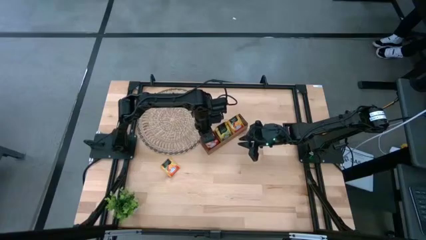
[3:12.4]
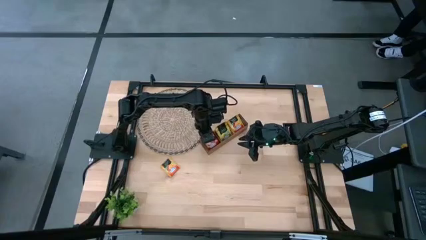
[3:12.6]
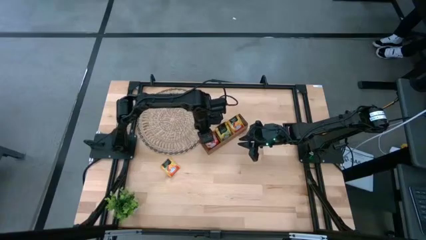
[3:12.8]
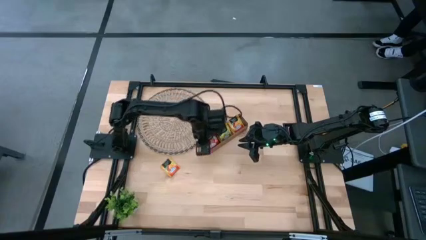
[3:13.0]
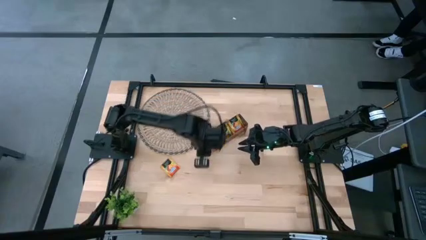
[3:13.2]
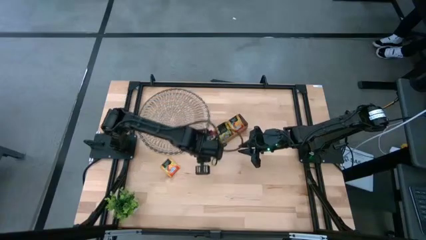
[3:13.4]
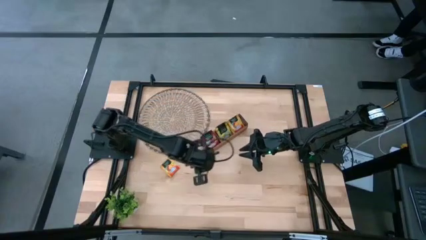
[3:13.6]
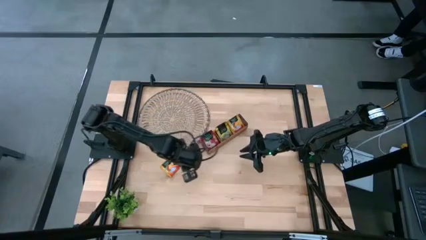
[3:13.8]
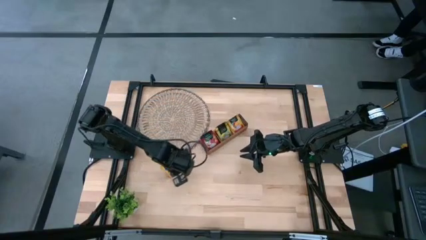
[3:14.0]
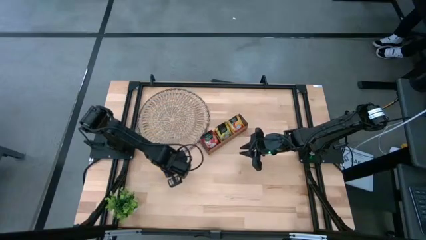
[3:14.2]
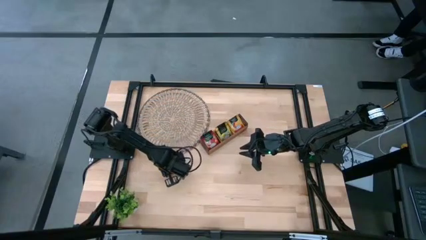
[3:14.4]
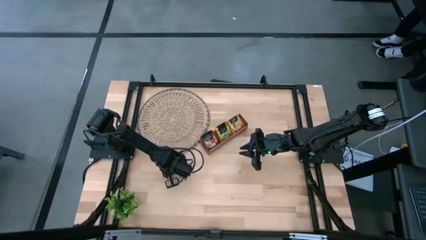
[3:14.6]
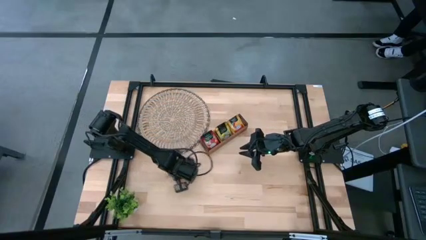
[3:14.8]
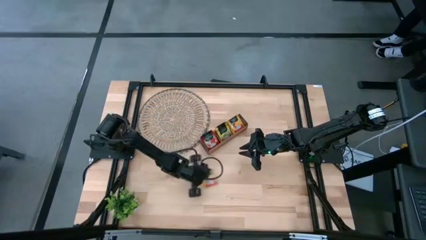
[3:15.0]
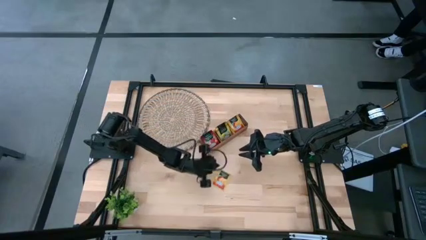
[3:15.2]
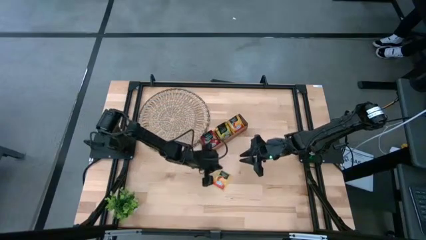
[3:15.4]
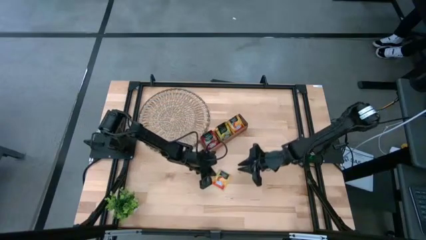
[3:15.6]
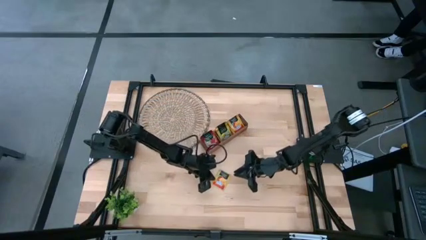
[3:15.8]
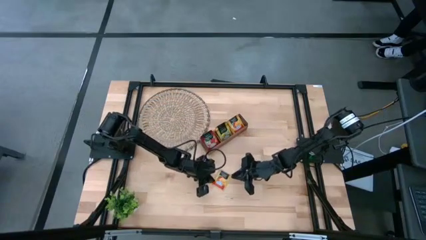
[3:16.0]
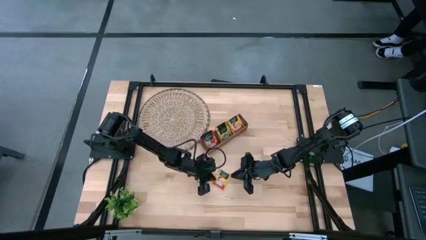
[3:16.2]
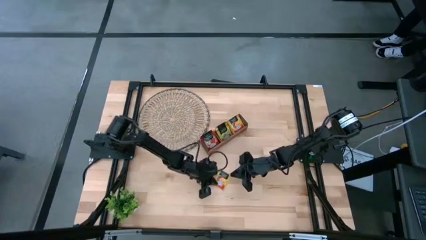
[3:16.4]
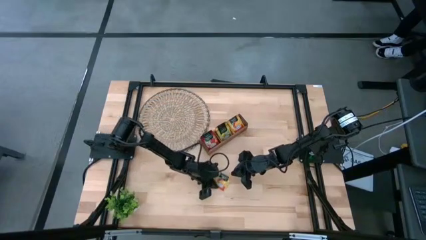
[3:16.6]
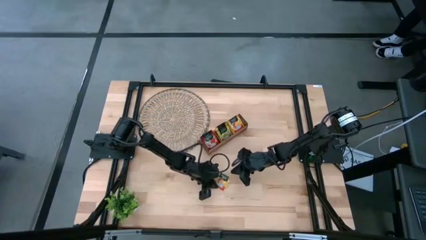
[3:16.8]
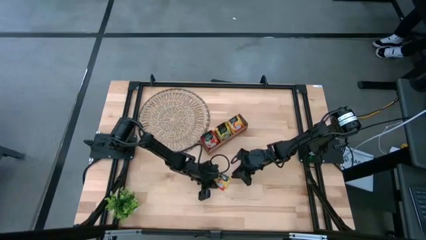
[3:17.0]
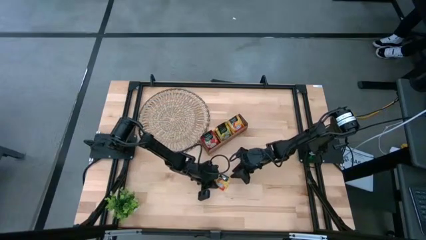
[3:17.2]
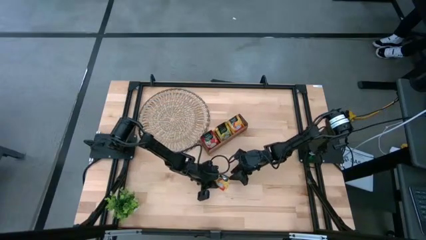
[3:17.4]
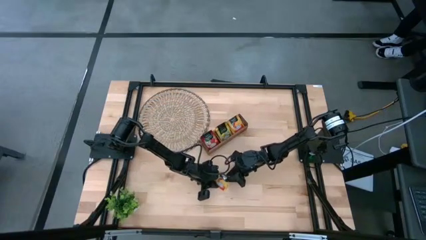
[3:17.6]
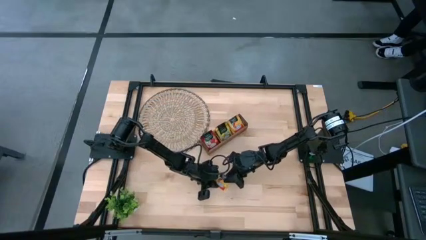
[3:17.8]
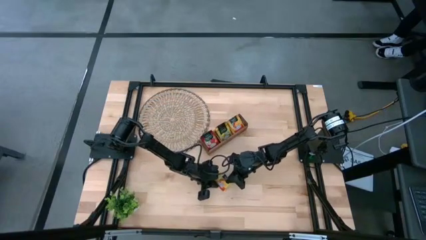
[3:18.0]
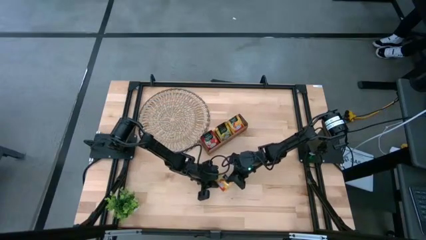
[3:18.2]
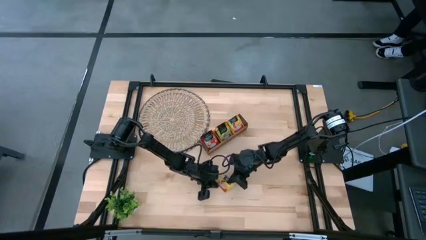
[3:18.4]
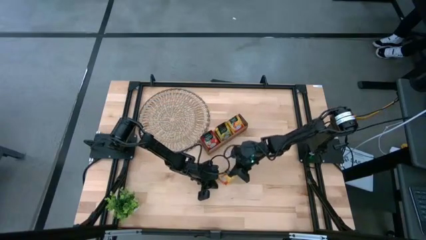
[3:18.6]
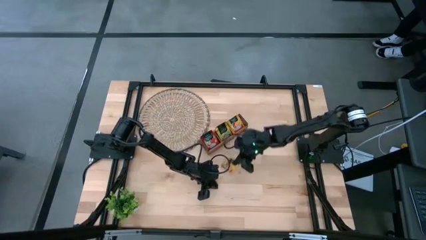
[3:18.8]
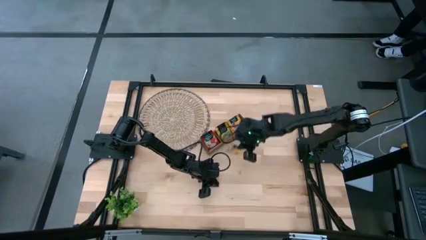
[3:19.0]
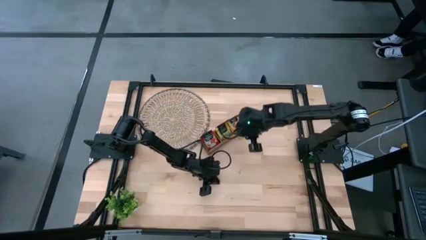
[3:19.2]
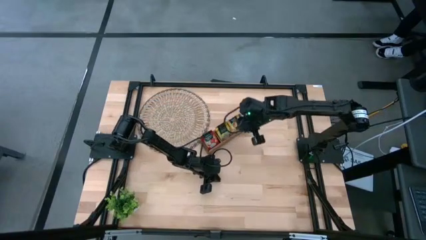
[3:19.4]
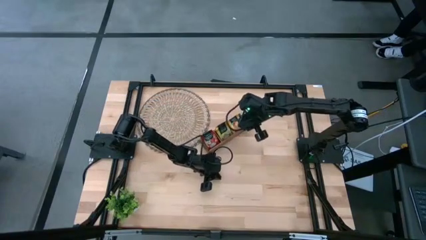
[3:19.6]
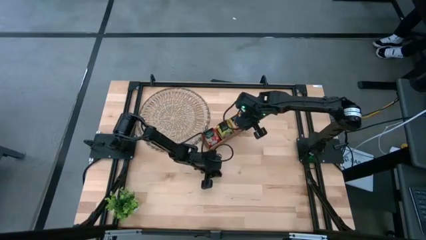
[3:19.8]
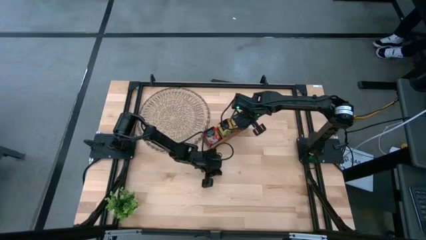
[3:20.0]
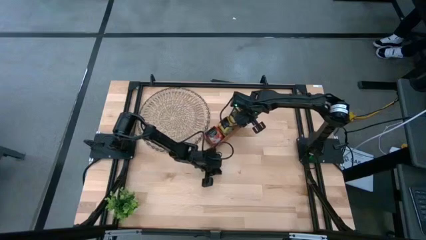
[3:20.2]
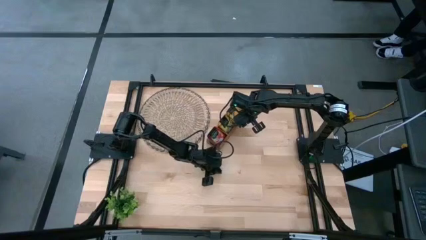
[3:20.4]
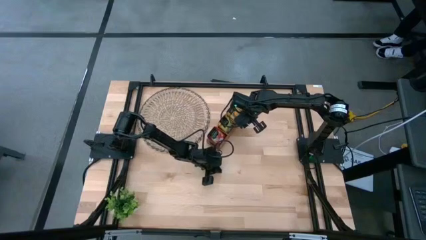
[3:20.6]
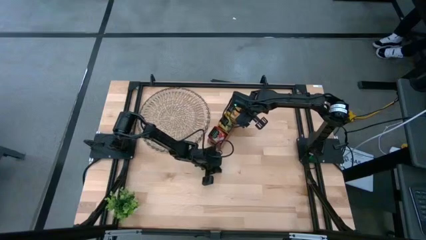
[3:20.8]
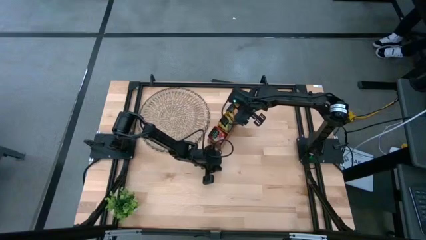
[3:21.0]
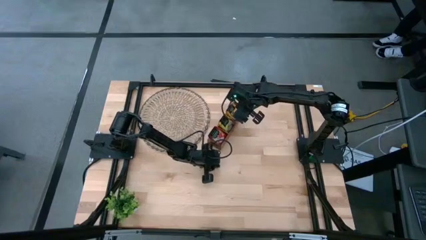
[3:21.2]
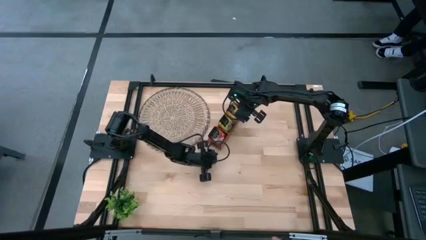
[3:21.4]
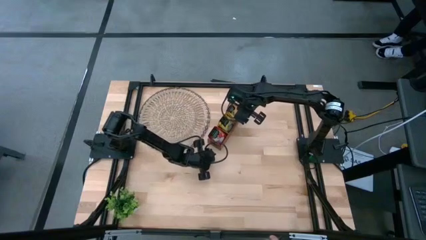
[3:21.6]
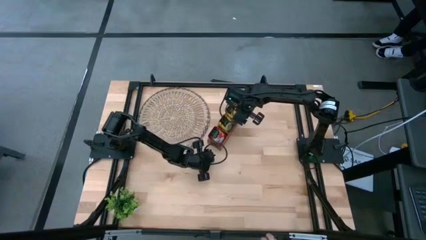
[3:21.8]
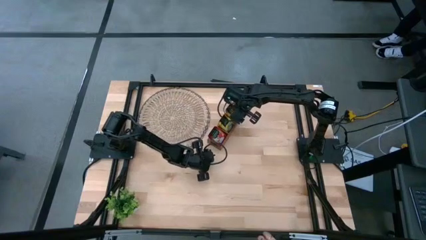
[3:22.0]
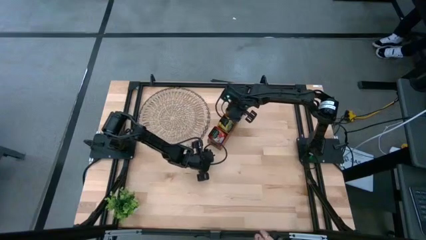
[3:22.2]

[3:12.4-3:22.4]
Task: Pick & Place Tea
Put the orange tea bag into the right section of the wooden organizer

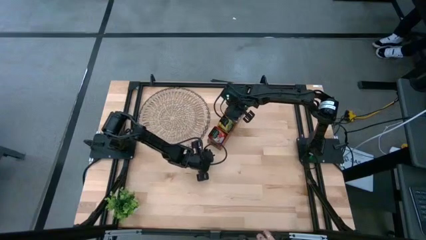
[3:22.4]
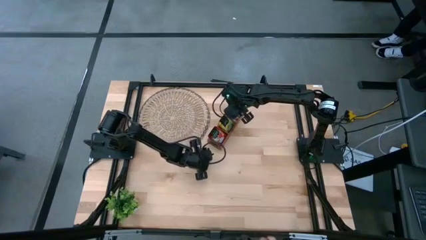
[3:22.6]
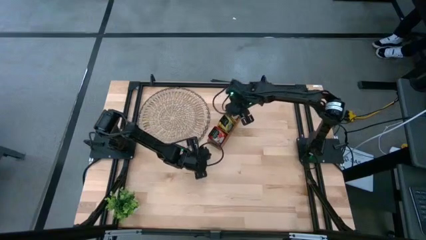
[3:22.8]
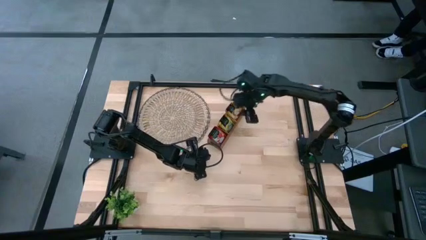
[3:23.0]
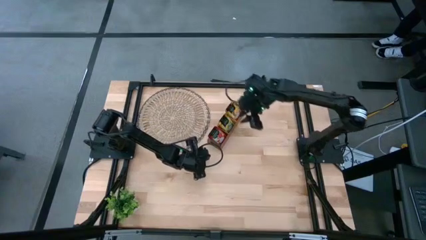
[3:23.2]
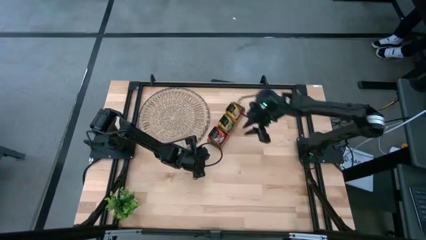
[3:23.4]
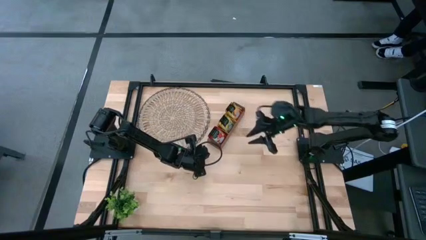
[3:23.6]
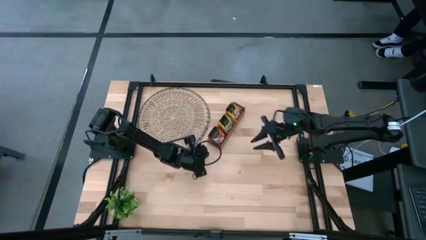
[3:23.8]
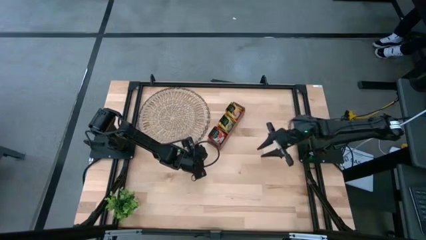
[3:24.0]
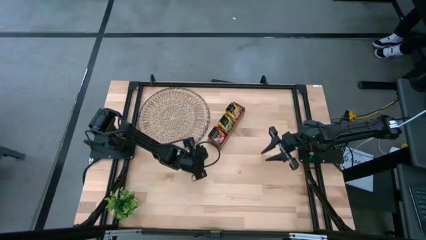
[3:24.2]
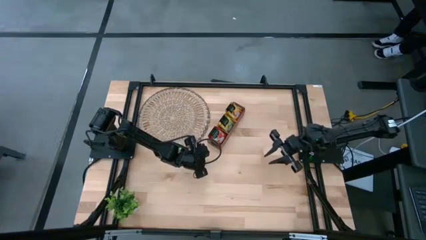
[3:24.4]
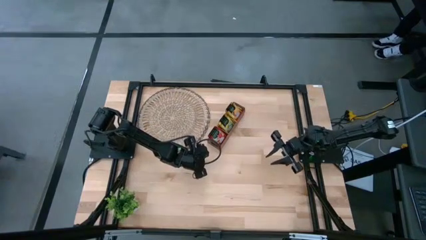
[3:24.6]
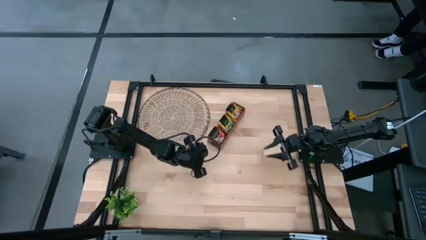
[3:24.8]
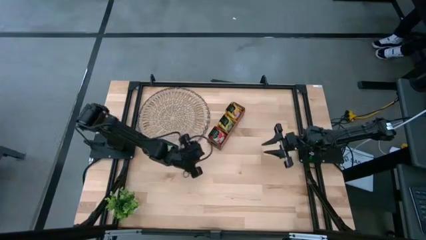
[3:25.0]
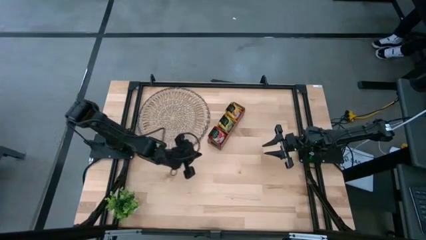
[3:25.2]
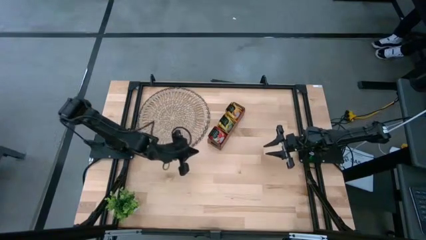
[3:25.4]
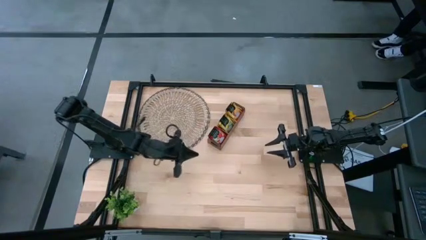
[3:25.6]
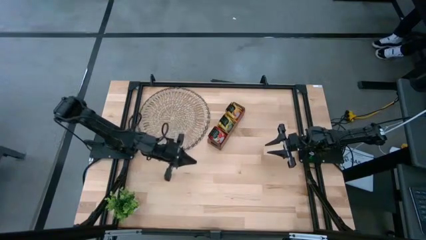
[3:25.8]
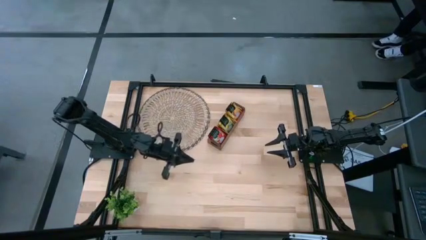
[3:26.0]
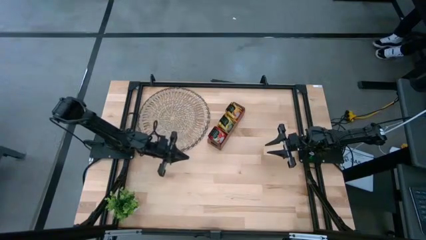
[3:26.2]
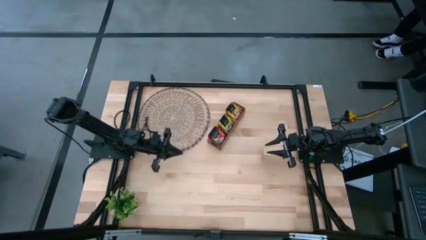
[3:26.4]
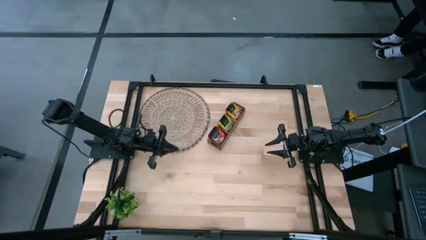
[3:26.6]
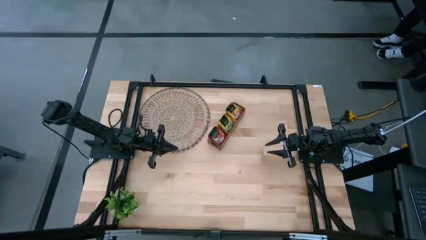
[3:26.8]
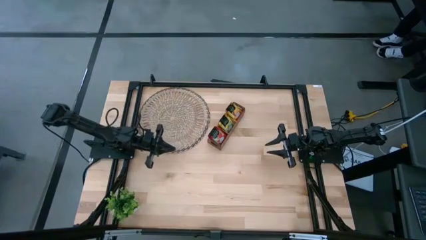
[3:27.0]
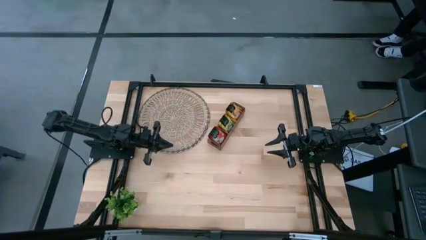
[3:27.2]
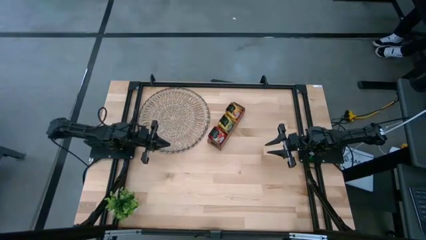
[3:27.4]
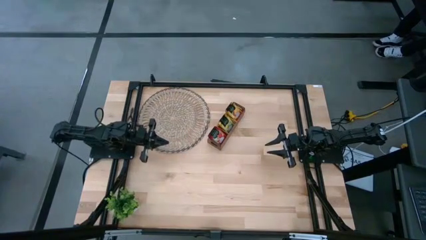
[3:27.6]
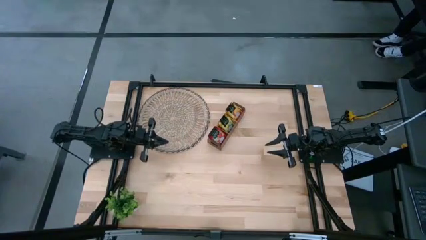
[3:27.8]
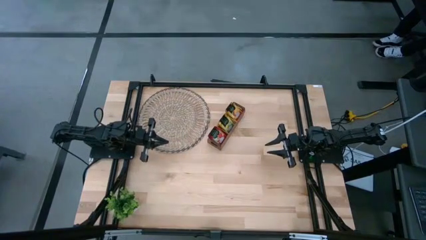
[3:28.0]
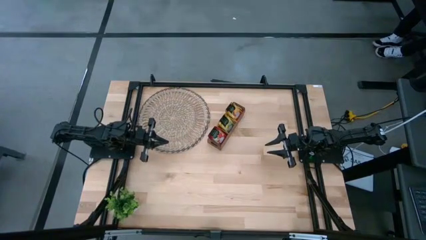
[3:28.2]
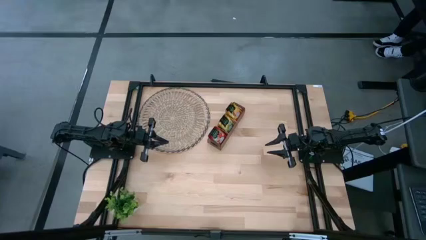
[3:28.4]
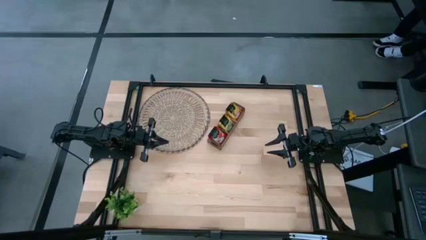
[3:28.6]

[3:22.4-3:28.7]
Return to Home Position
